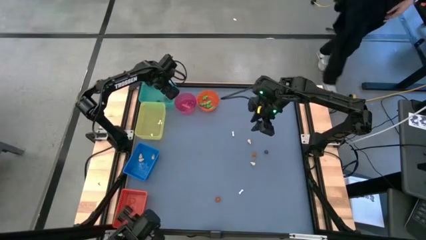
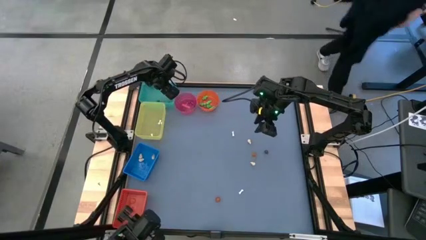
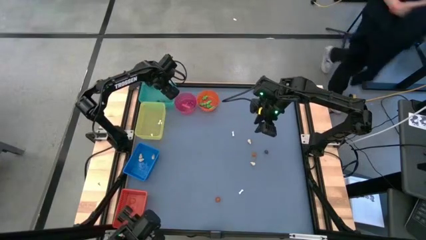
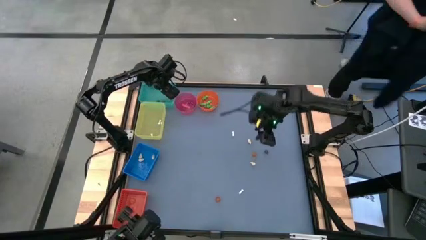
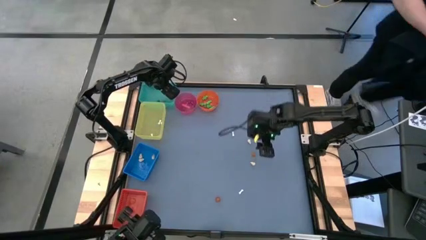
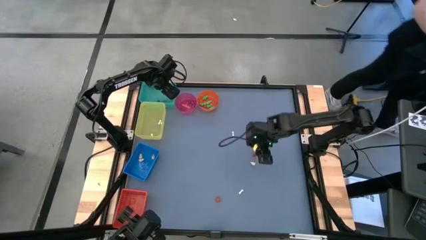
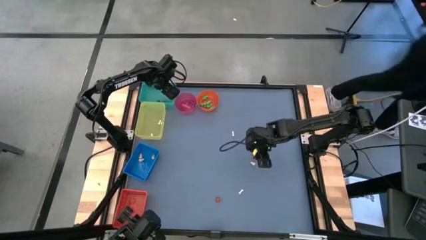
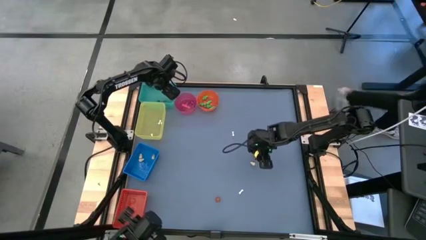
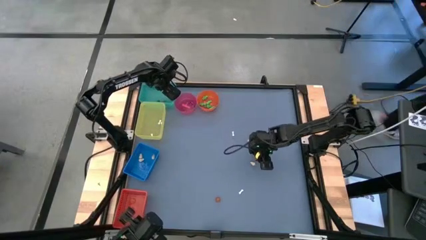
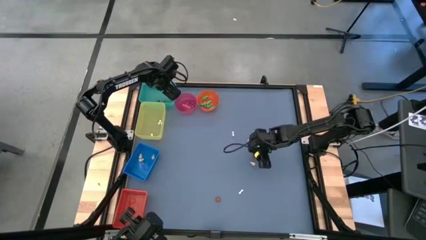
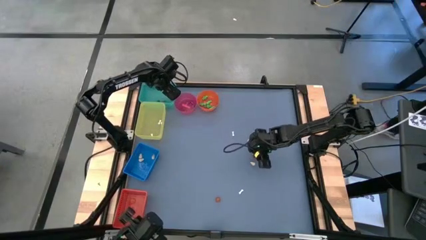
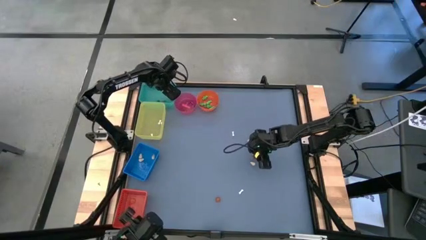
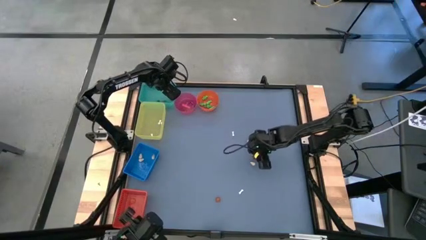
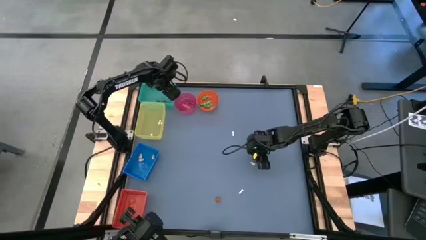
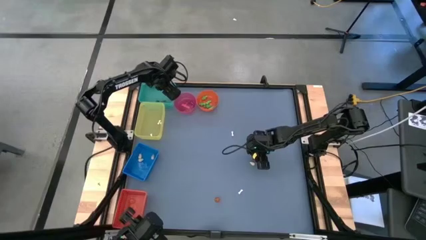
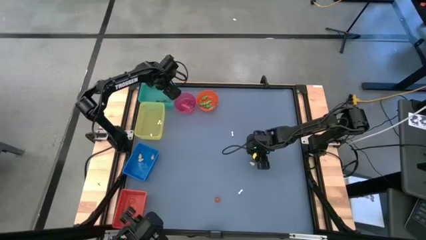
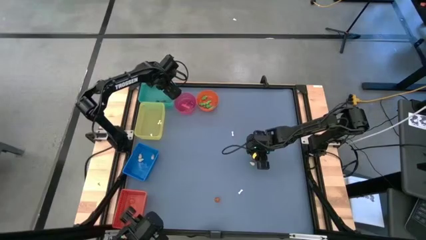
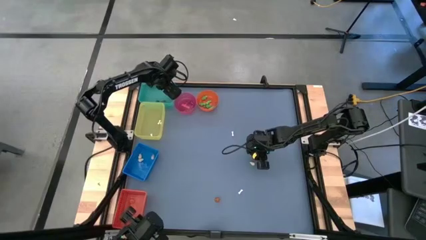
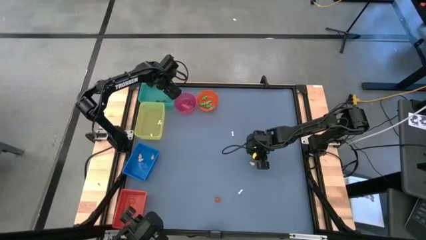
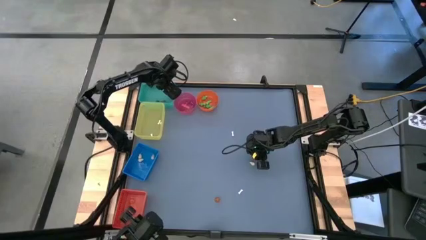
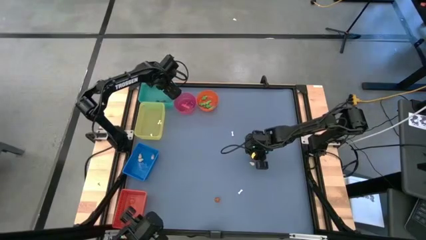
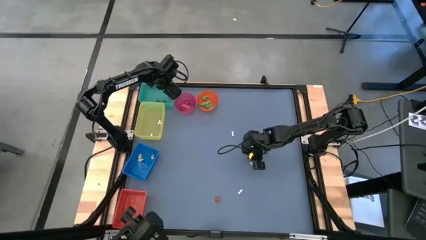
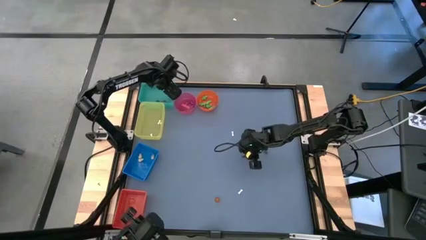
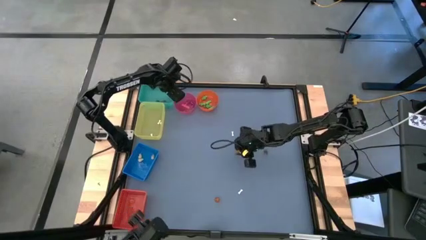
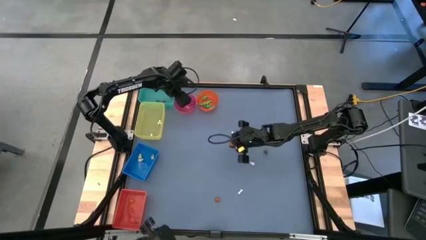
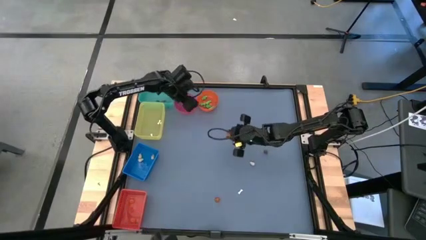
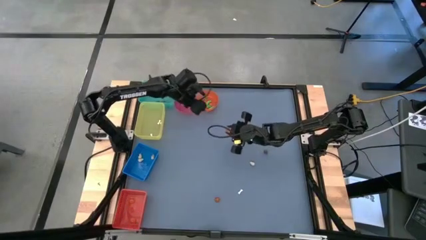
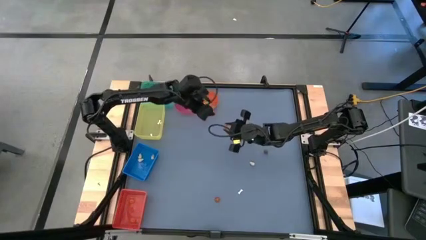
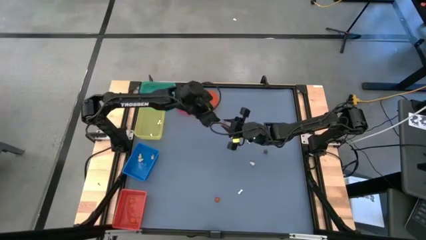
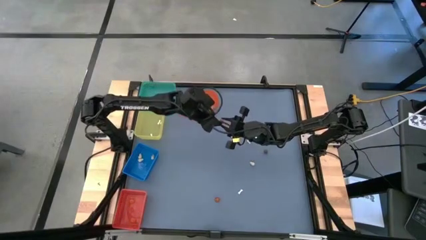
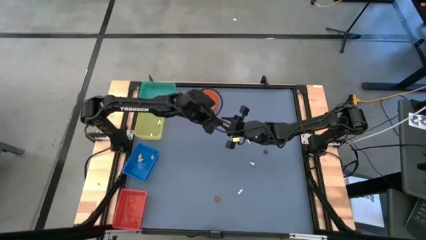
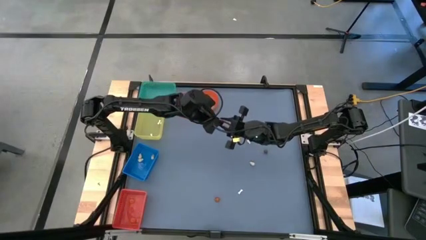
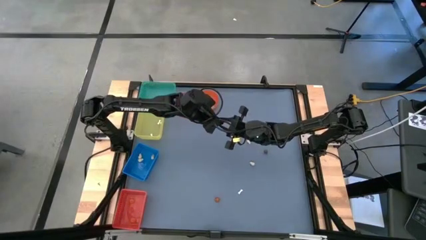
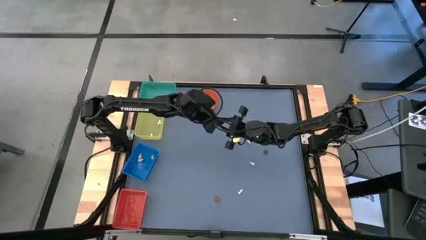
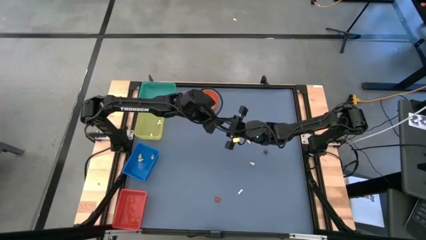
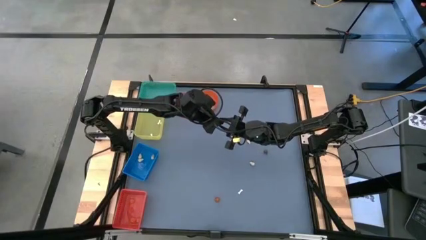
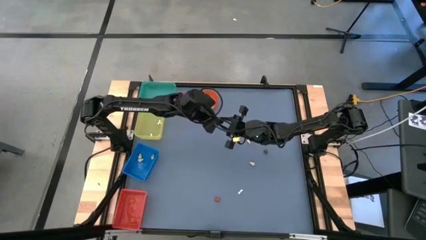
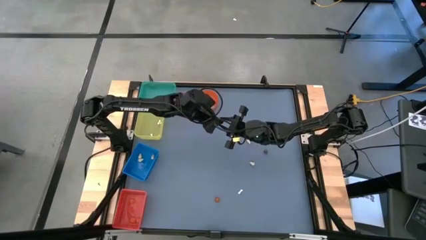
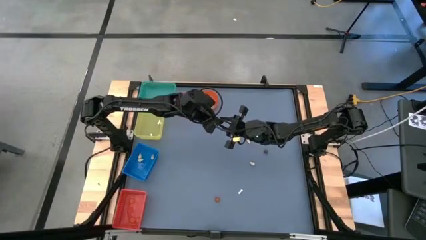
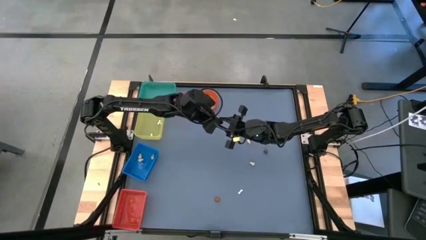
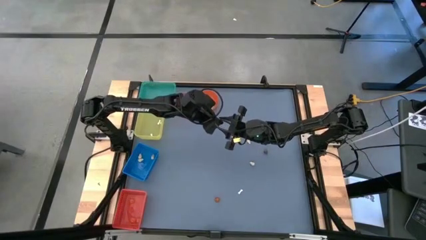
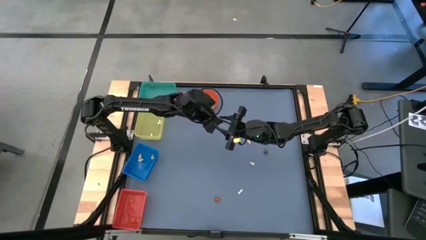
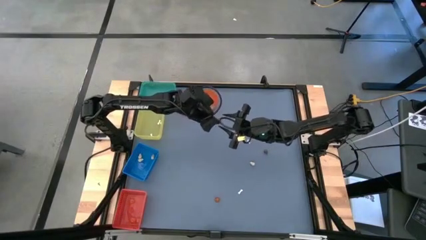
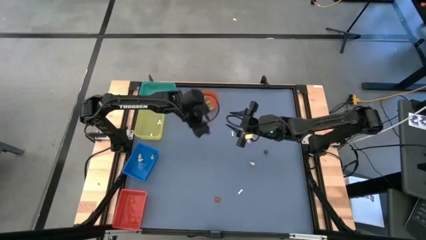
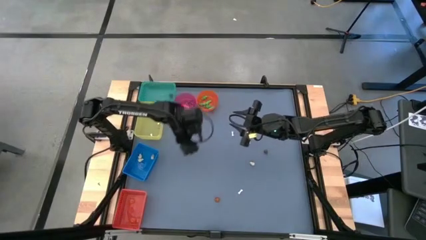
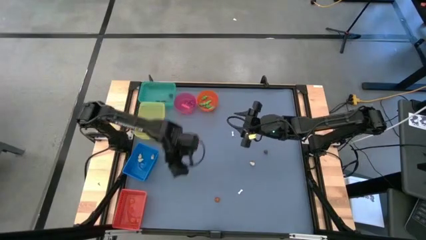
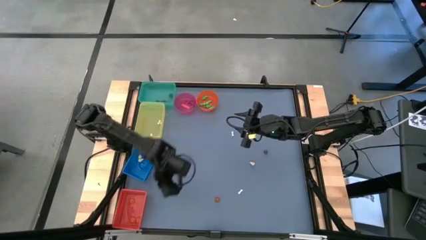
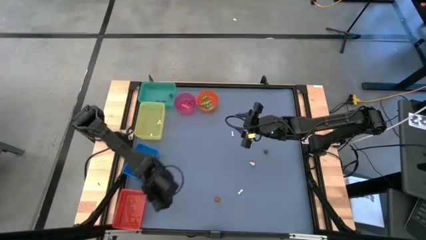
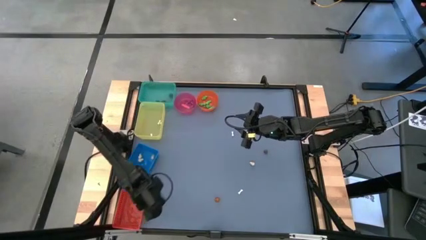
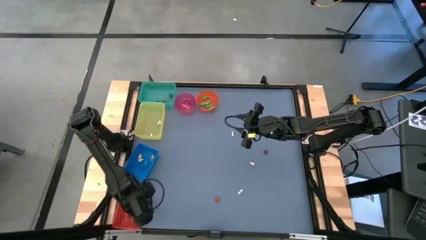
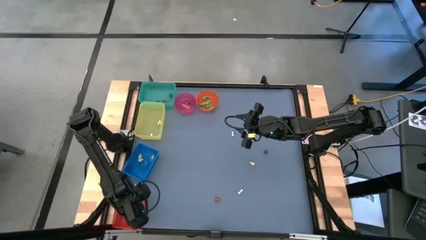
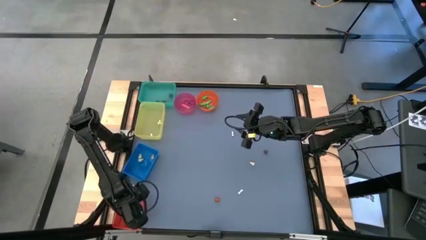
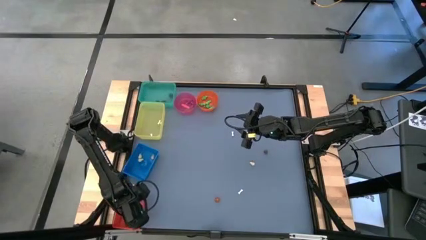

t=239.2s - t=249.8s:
Task: Sort Halloween decoration
Put the orange pumpkin toy into the red bin
